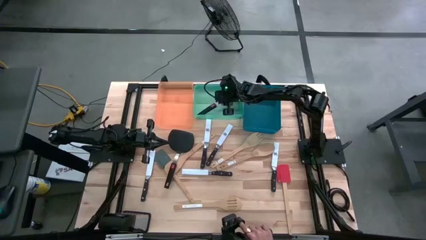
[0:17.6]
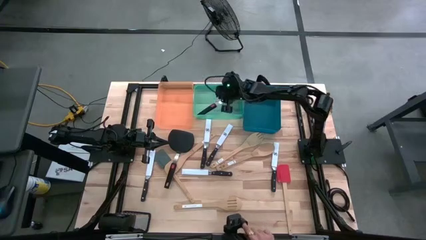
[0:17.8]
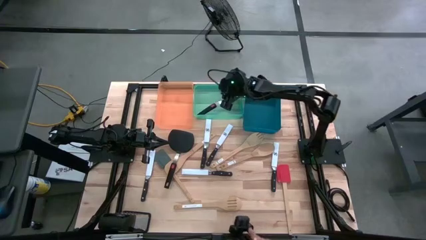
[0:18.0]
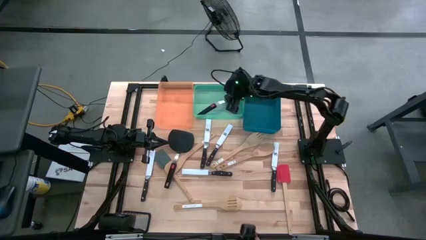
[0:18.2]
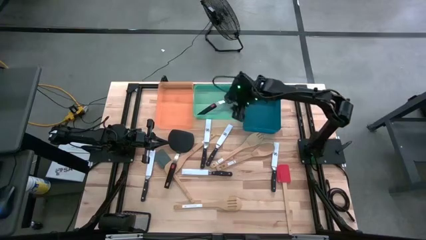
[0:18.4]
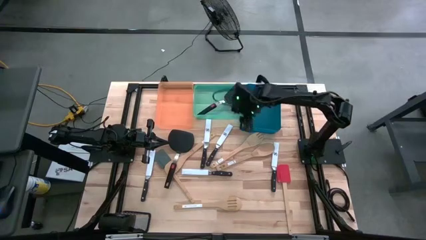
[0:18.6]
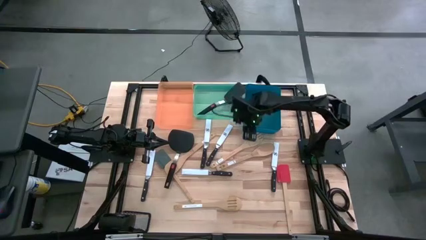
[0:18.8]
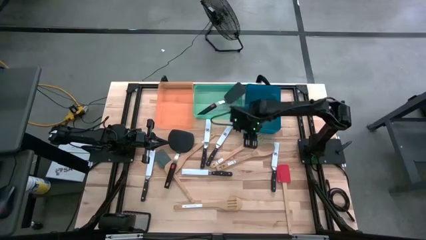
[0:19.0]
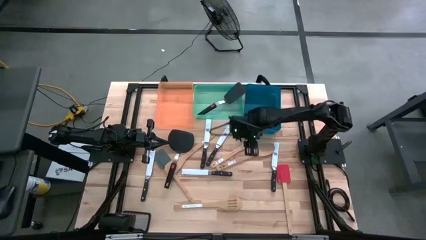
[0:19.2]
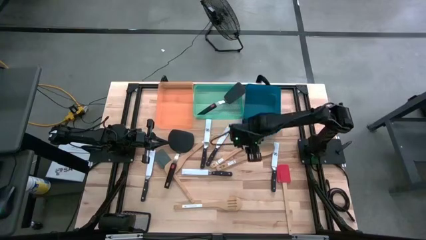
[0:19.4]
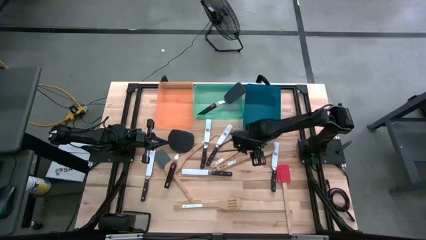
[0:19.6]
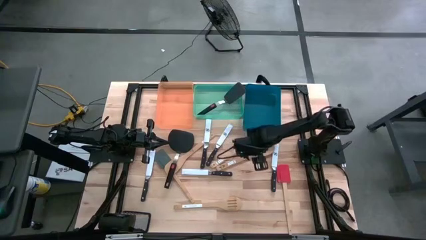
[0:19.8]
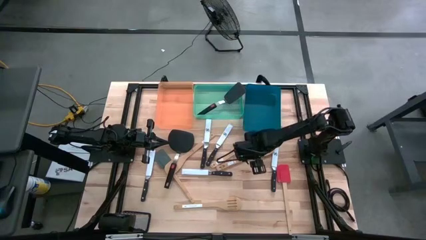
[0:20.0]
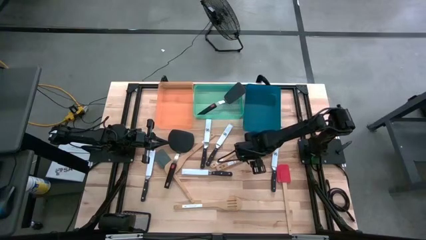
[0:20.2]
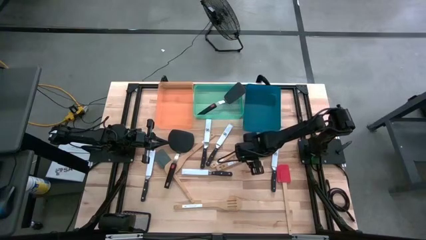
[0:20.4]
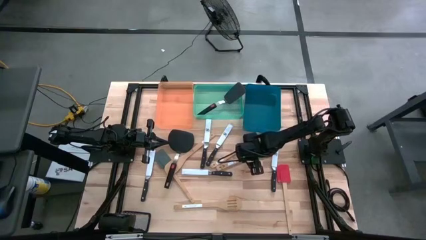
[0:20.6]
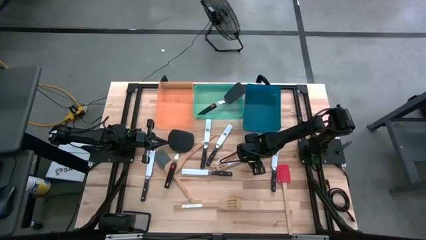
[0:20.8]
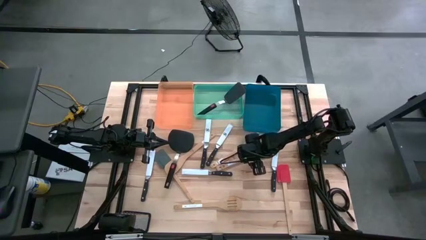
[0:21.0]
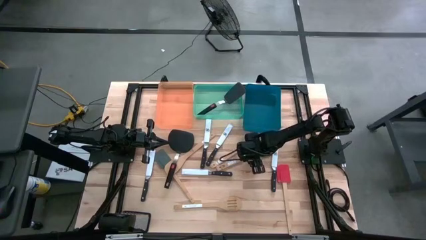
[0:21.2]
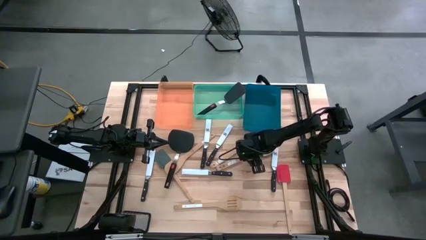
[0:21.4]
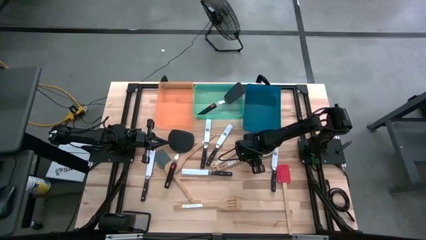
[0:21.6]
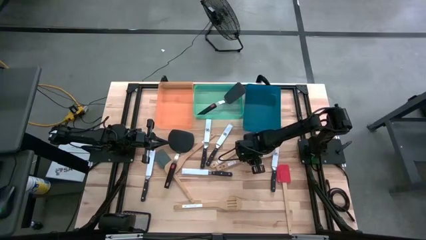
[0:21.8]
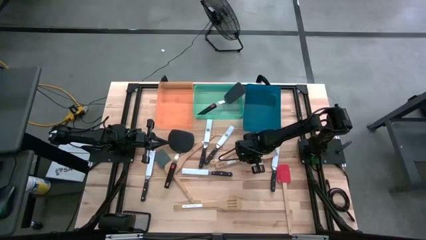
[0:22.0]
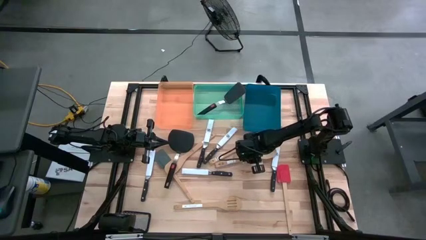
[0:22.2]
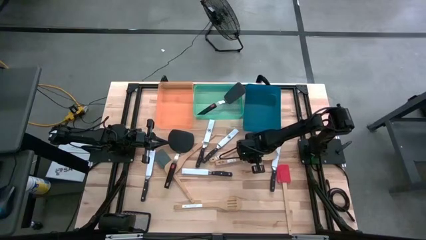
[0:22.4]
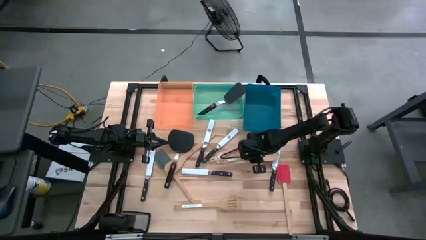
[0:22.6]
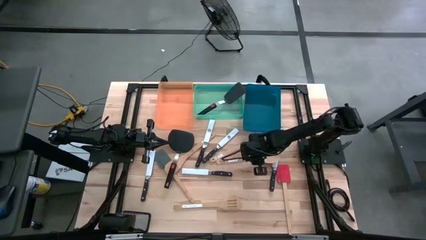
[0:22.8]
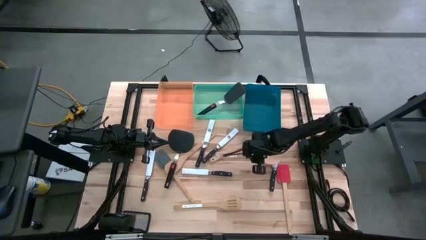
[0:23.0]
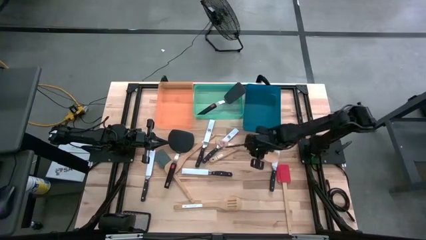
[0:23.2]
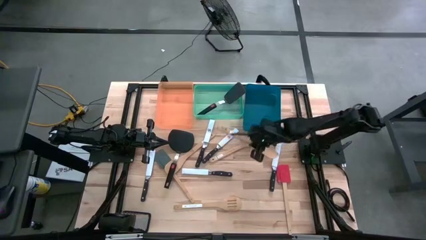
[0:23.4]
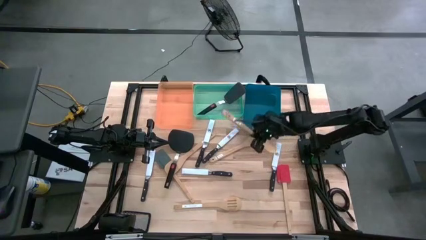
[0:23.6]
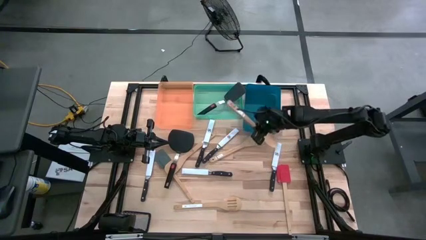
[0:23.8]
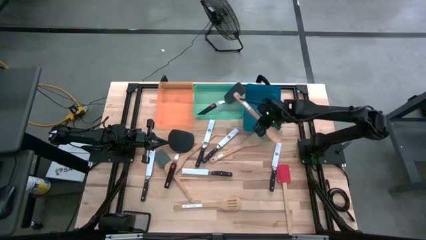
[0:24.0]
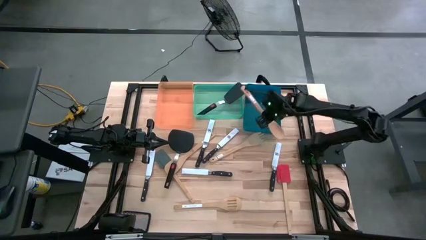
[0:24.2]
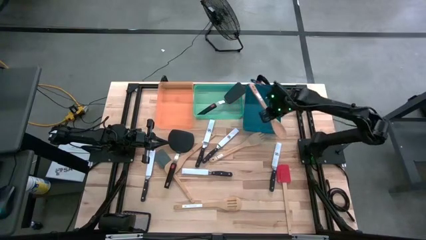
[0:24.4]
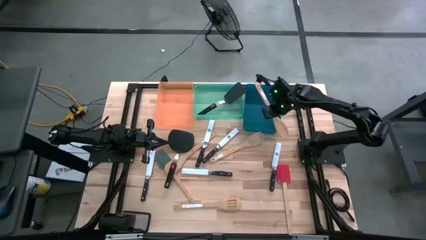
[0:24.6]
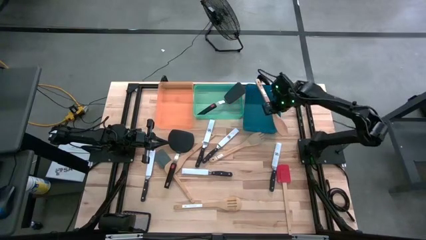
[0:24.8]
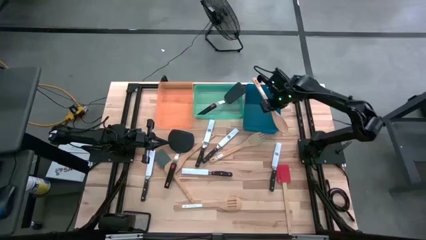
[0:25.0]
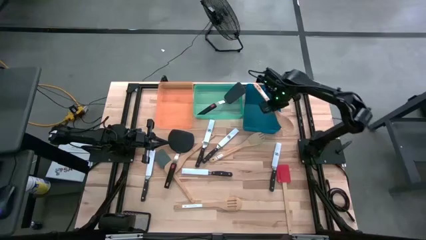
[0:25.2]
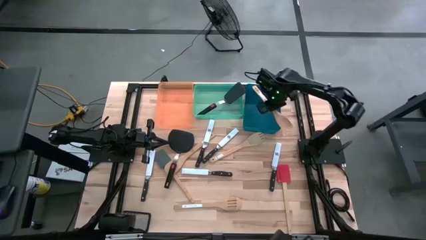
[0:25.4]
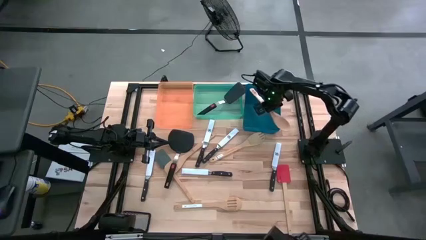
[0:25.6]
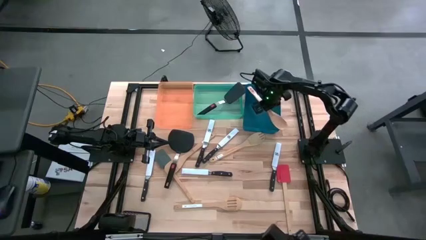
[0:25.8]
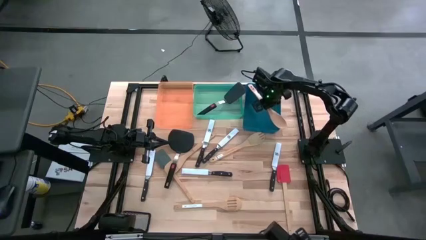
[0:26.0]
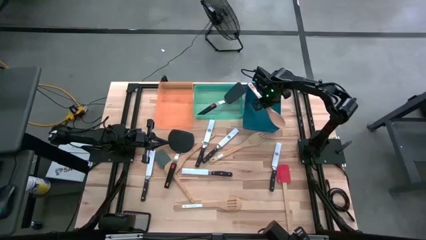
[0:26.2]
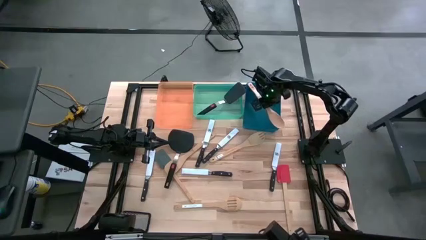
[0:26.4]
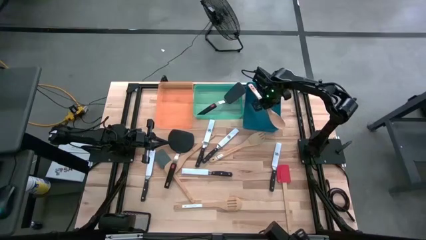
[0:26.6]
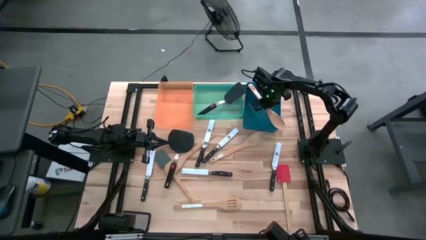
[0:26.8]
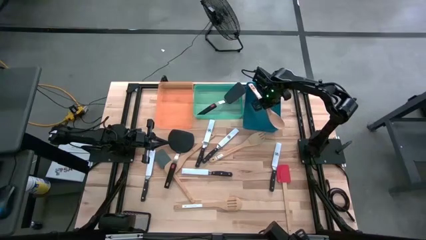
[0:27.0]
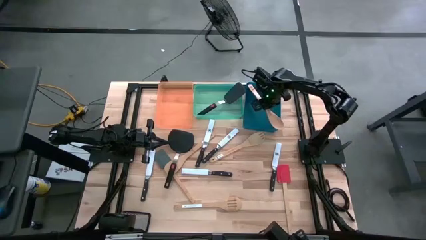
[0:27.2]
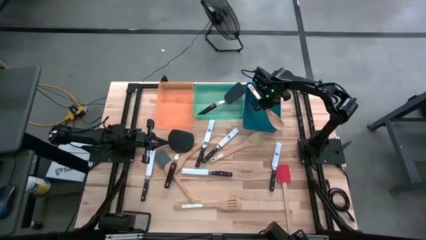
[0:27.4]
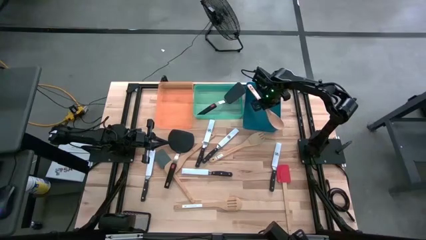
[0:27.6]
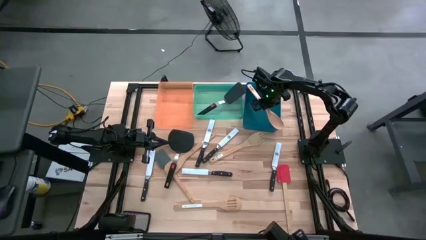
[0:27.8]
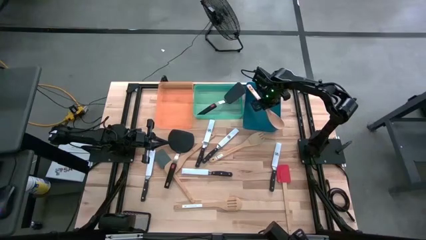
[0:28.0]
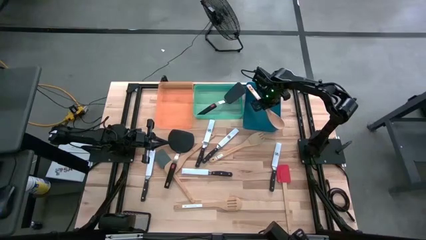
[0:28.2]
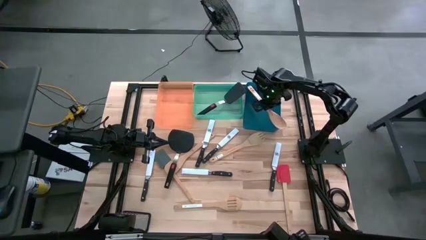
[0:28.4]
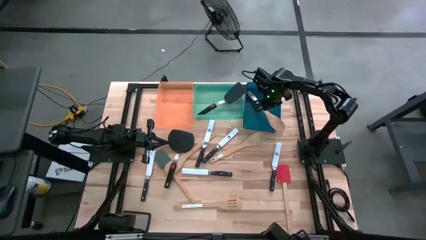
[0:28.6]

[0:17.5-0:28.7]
Task: Pick & Place Kitchen Items
Put the brown serving spoon into the blue bin
